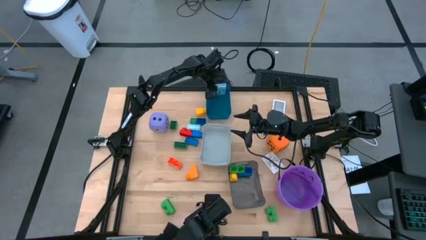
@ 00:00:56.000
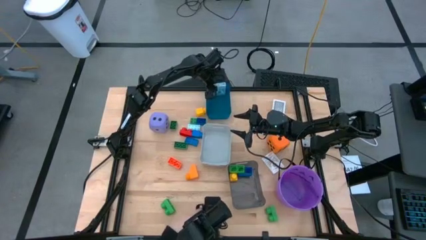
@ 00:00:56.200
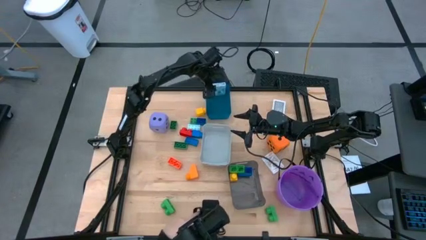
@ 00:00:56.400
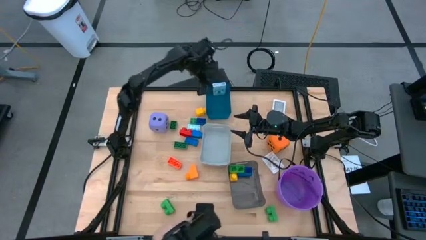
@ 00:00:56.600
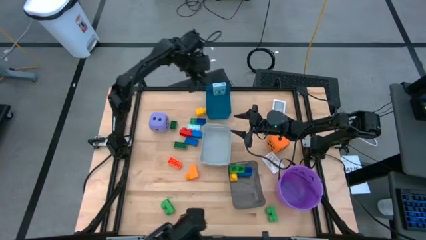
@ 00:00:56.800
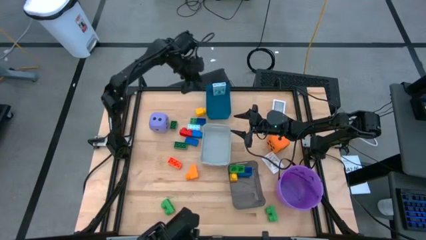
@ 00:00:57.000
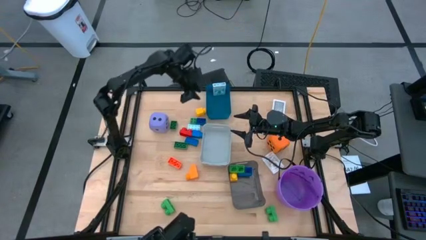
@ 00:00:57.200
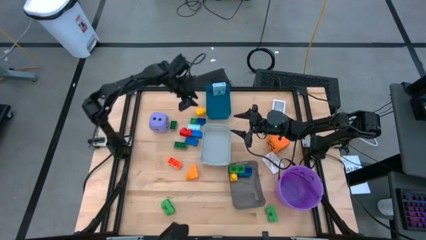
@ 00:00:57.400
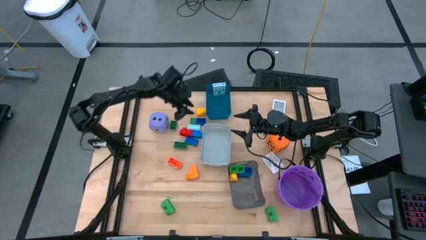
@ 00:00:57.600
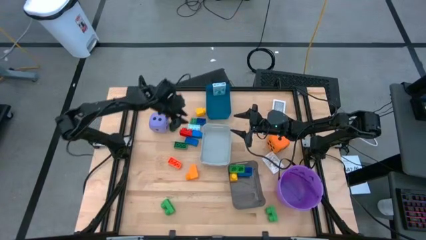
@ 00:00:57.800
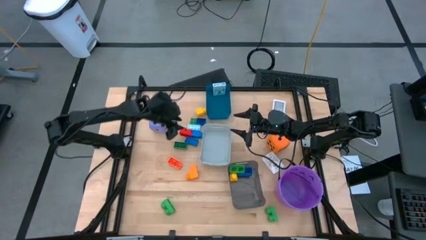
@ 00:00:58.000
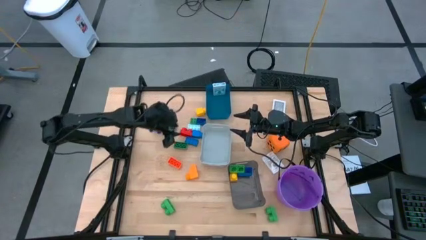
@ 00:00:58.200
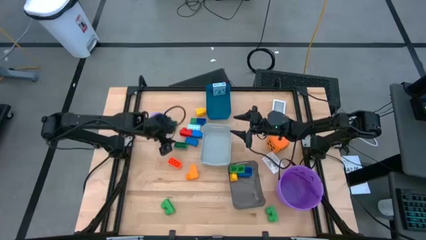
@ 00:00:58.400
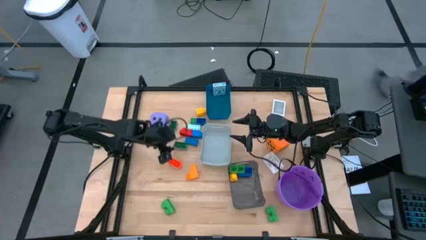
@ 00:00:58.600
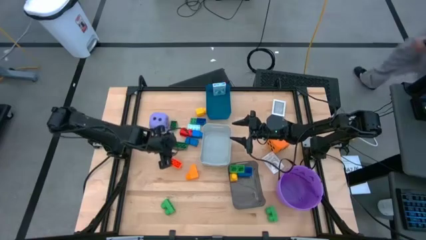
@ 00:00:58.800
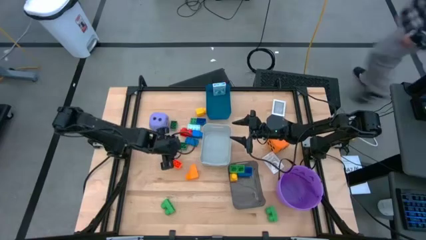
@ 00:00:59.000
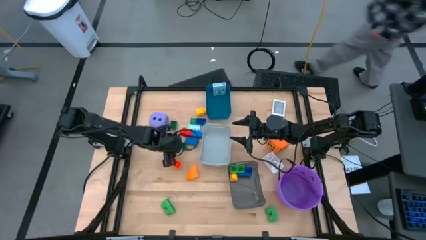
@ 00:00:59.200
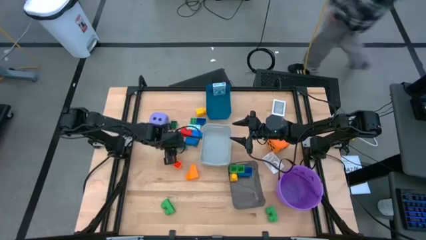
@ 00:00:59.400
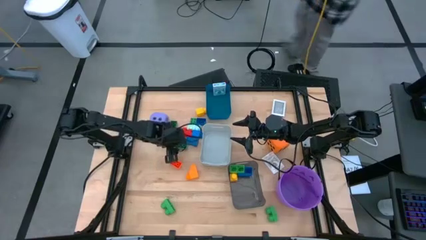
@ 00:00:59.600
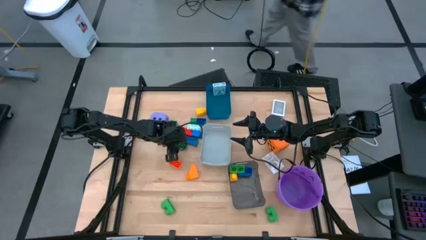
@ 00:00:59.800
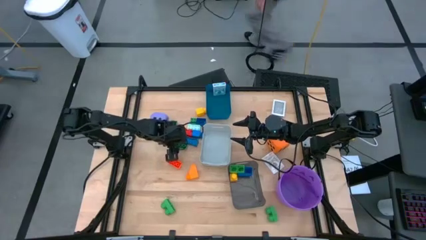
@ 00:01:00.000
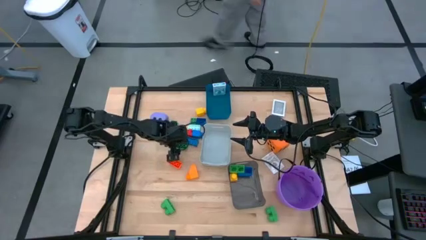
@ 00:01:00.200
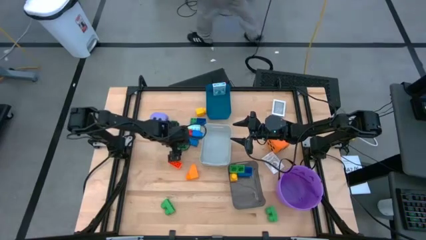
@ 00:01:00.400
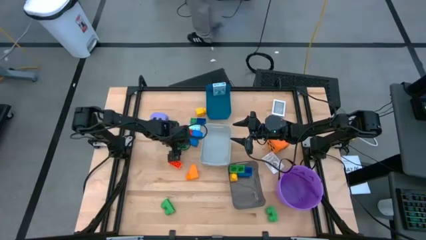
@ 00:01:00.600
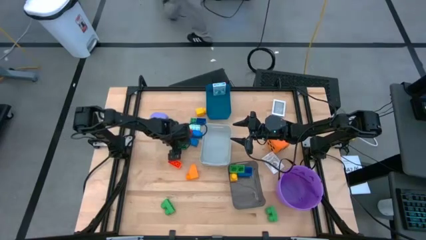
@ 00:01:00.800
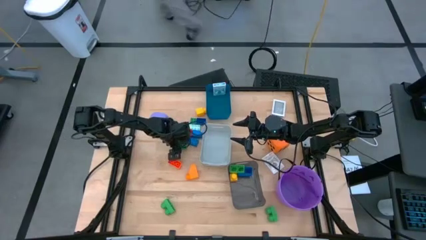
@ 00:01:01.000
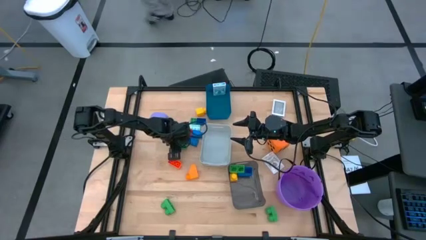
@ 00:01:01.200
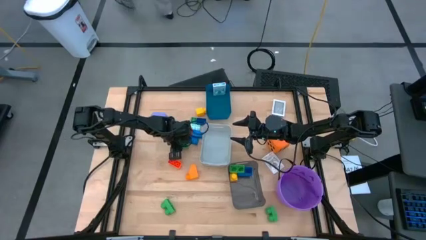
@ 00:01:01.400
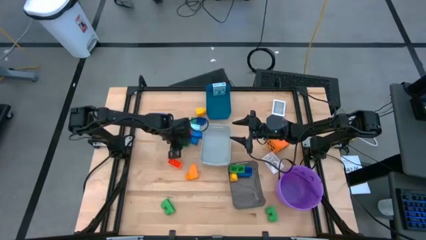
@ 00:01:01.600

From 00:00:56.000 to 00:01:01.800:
Task: Pick & Place Toys
Put the dark green game piece into the black bin

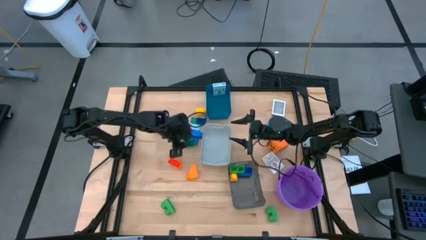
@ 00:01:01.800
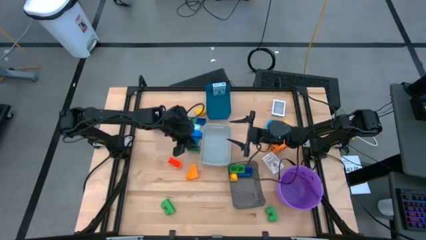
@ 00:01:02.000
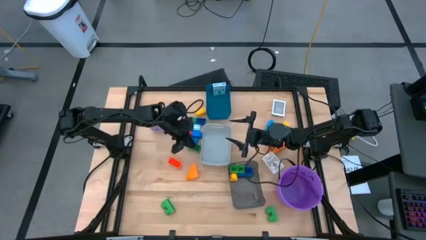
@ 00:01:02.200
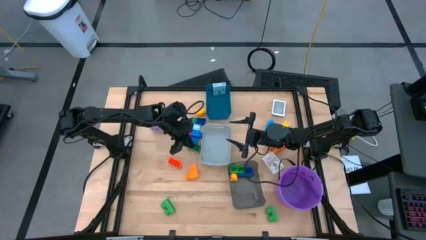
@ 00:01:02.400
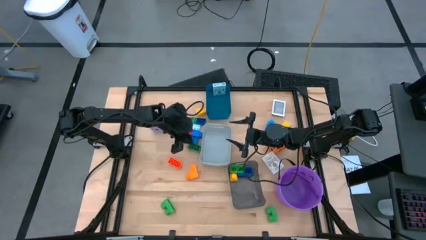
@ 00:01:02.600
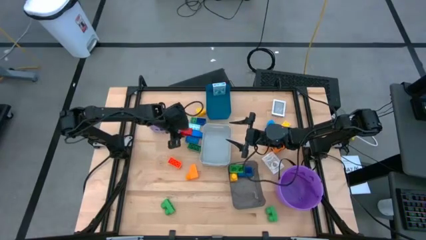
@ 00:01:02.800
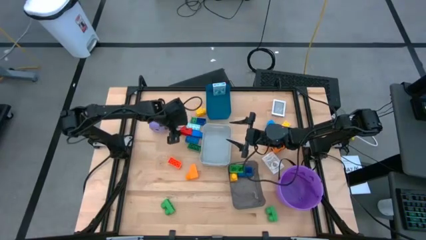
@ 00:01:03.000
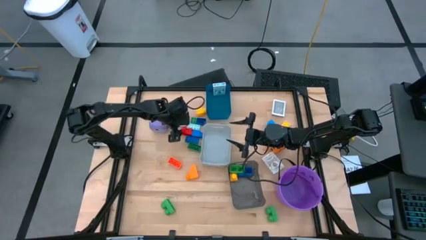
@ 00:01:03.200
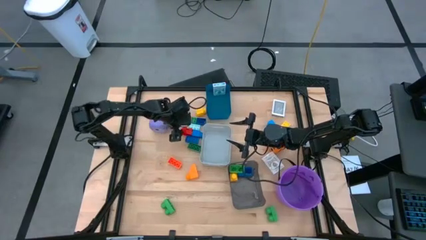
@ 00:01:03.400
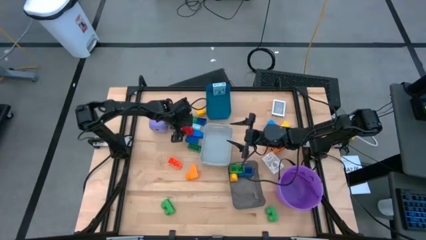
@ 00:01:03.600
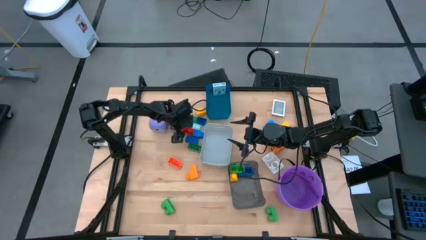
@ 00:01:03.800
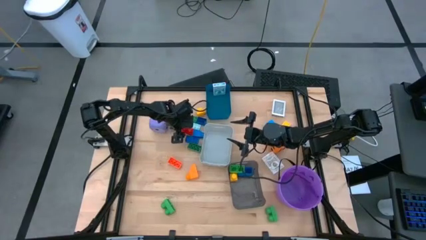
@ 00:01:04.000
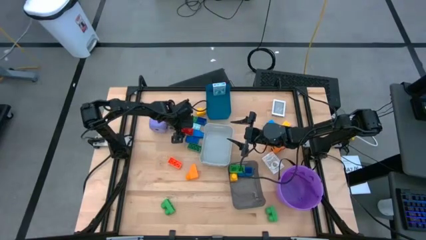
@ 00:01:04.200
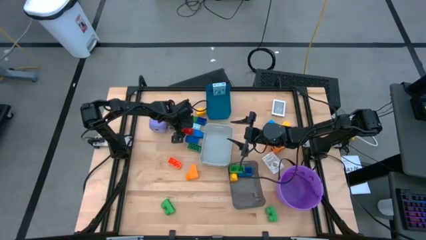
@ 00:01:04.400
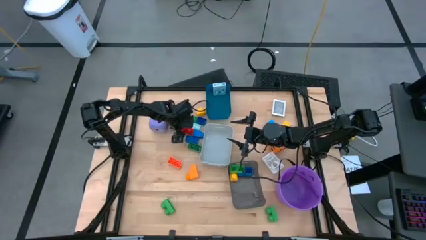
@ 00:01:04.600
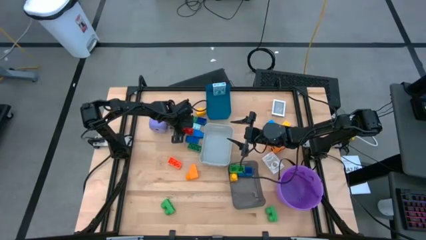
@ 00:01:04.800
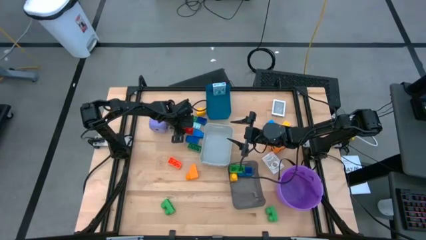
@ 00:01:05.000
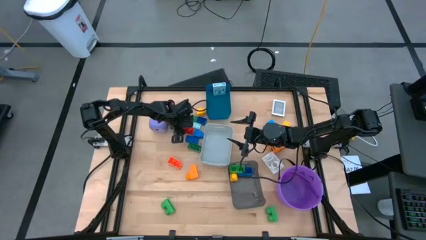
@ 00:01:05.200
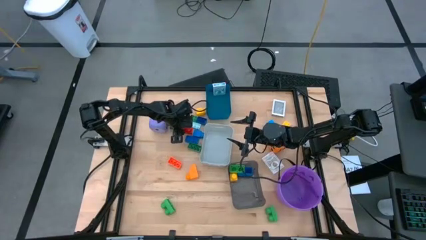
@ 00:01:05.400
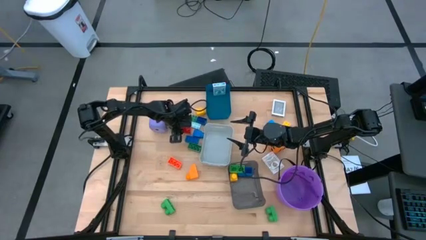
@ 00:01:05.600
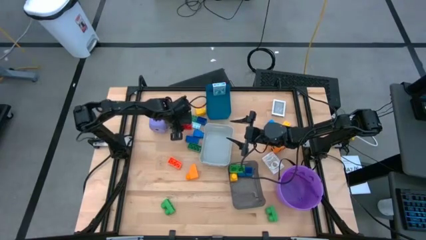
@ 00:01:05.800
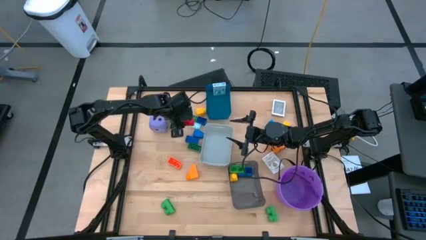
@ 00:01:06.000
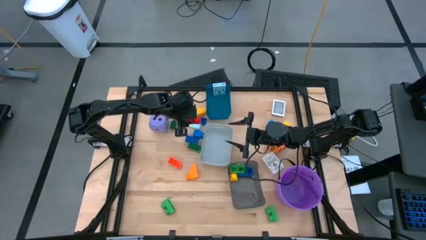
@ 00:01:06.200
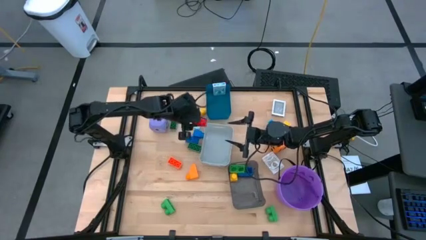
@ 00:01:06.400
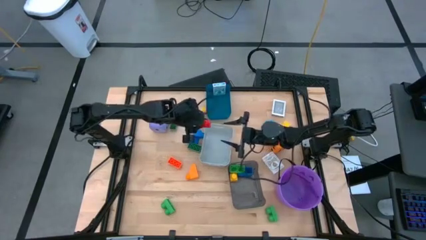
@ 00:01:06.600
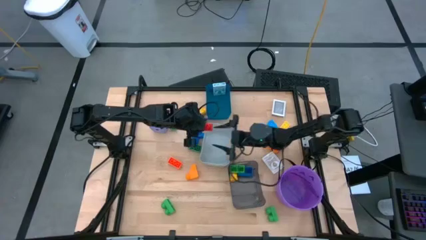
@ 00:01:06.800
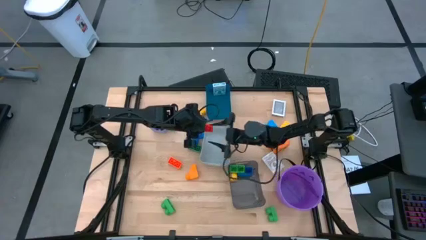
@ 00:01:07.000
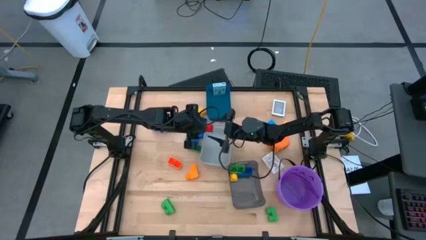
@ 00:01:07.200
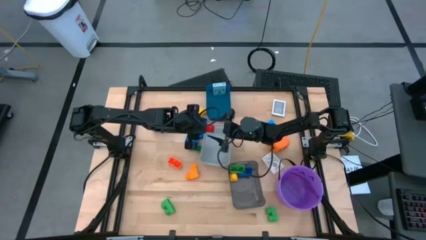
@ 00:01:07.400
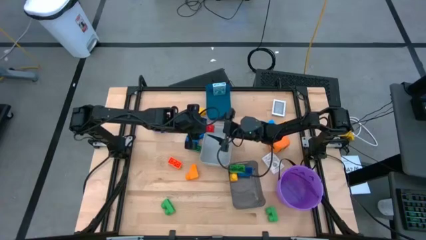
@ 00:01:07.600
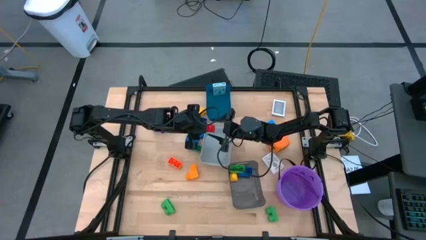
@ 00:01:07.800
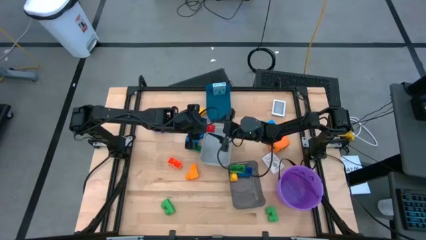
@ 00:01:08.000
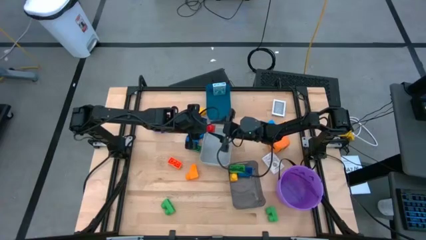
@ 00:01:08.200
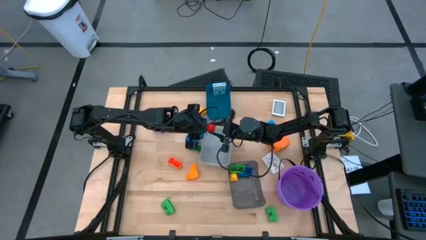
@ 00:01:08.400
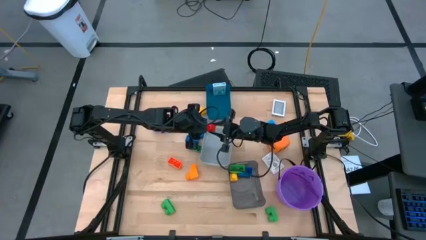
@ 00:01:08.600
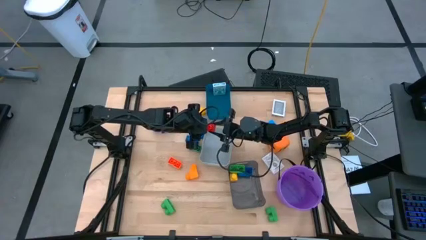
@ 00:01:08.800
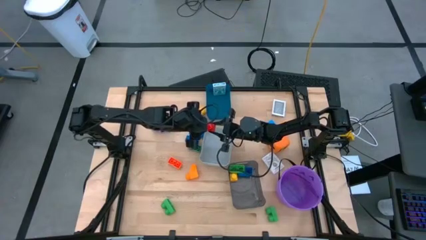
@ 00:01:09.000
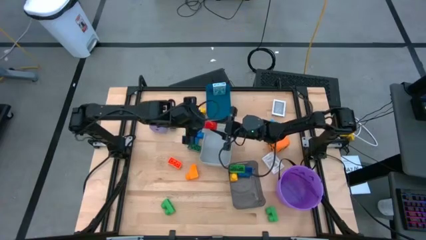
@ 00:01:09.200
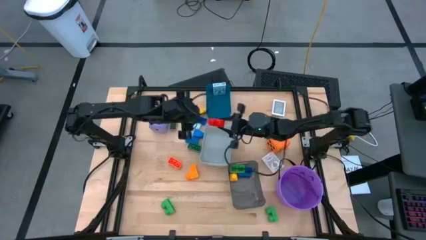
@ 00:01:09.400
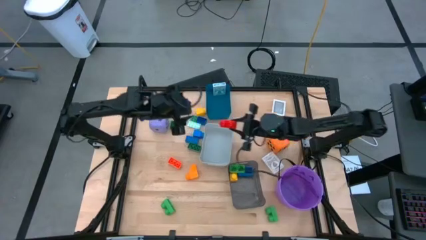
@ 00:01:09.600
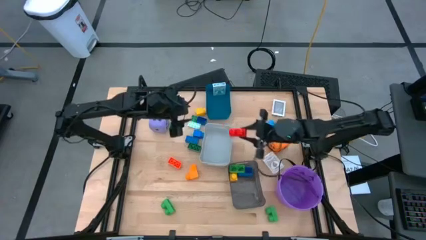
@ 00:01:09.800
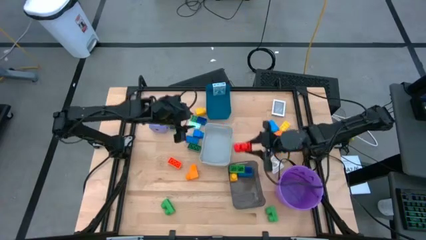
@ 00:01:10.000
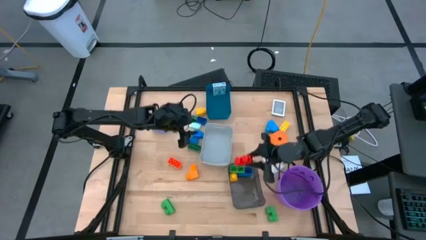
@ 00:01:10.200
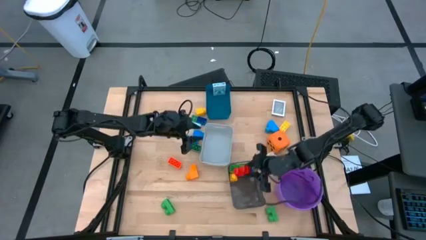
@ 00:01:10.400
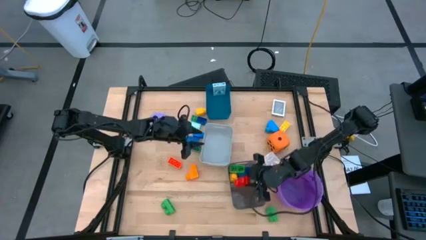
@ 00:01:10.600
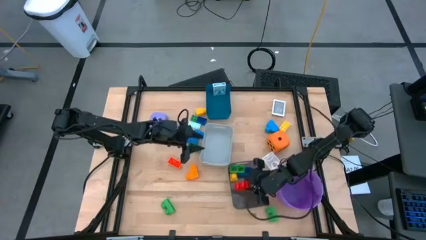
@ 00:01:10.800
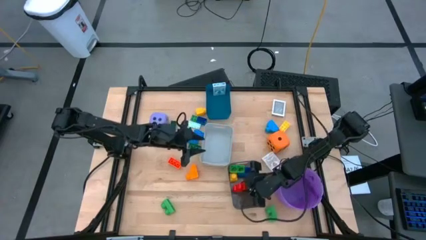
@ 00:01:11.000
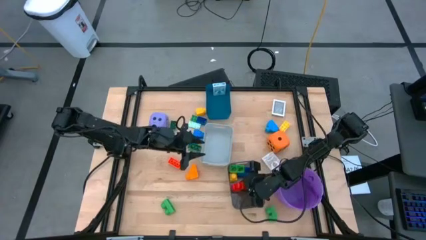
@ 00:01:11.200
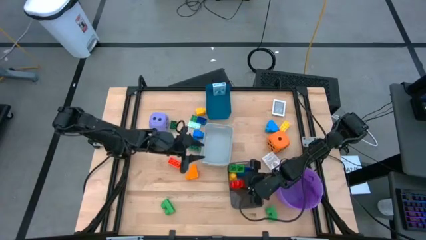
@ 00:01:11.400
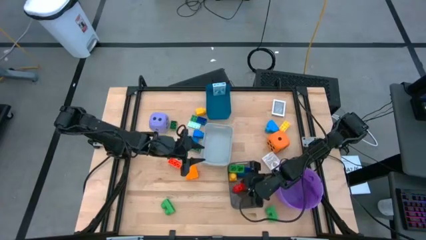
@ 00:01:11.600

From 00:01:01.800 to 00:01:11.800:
Put the red game piece into the black bin
